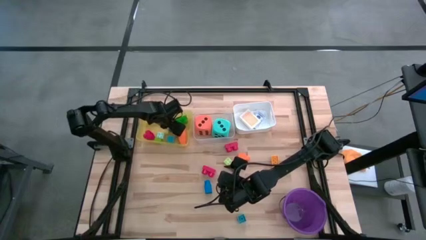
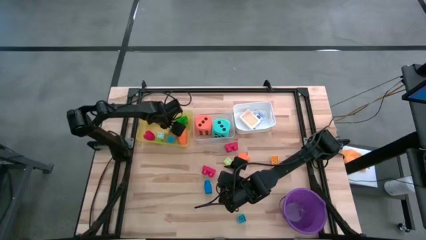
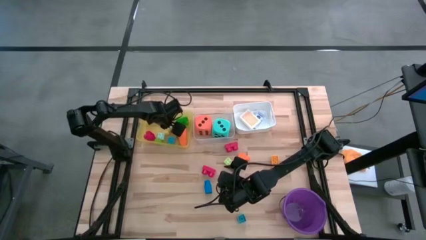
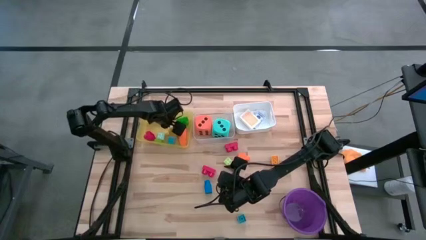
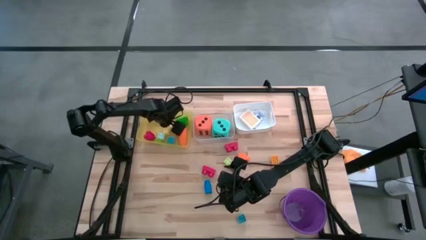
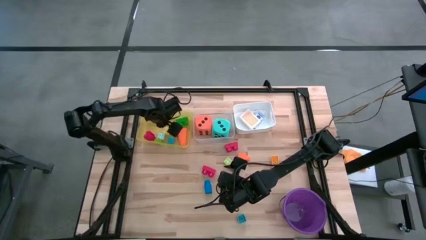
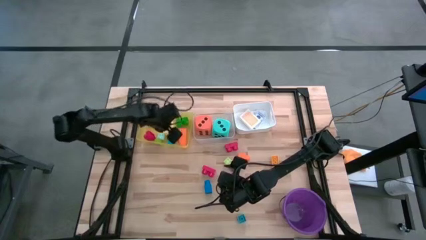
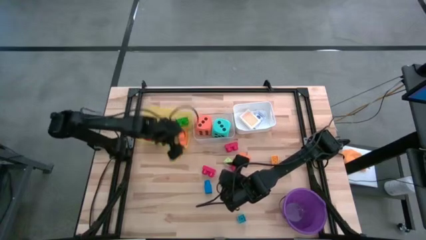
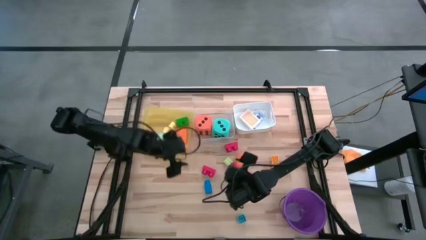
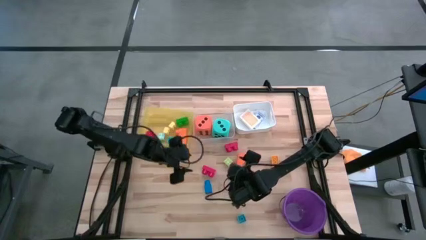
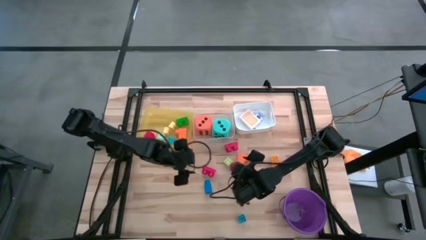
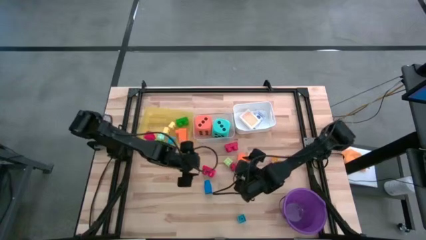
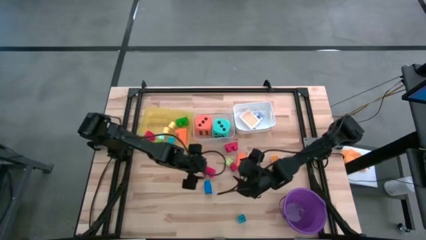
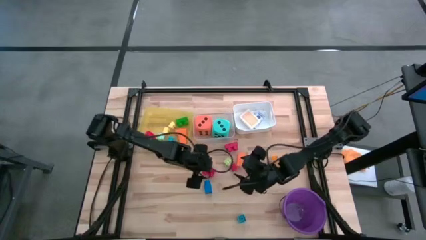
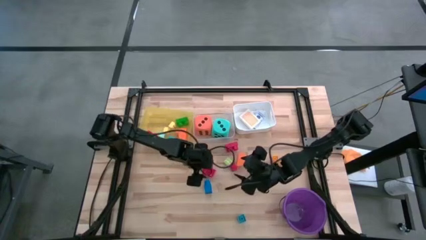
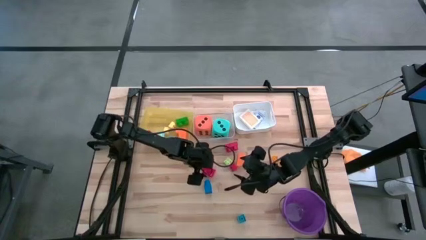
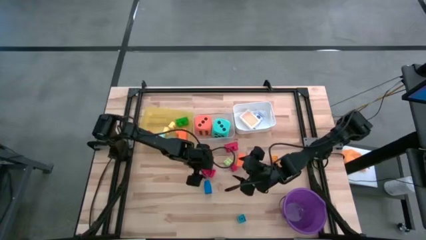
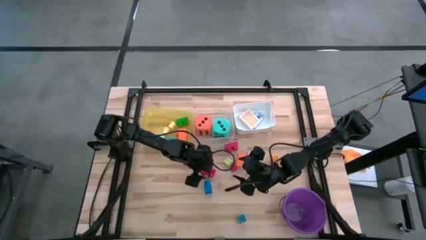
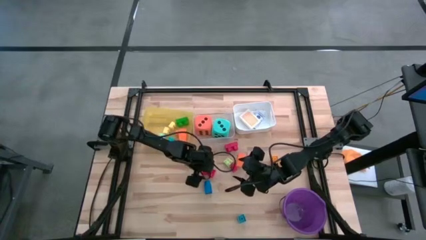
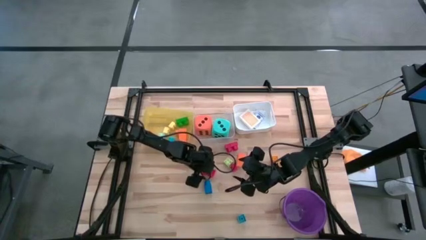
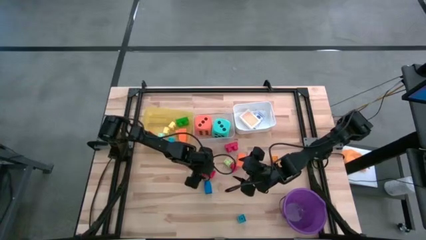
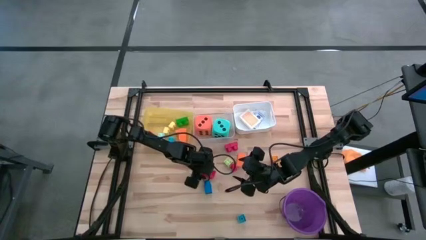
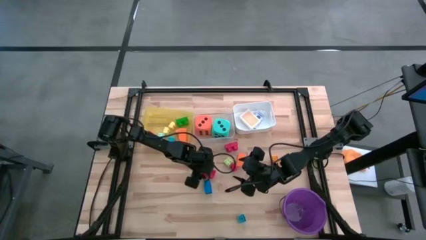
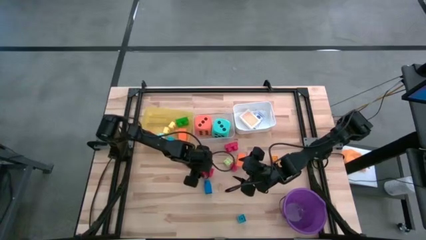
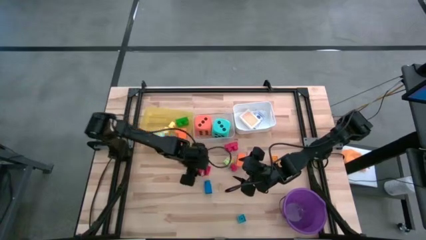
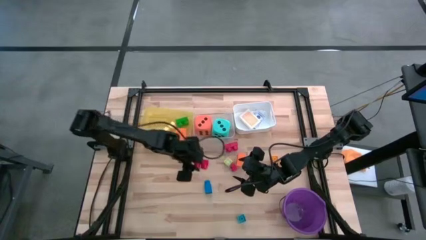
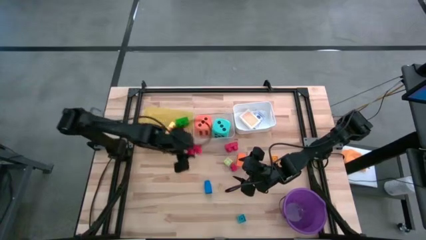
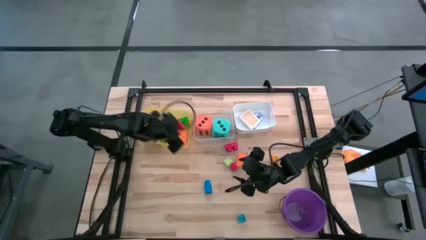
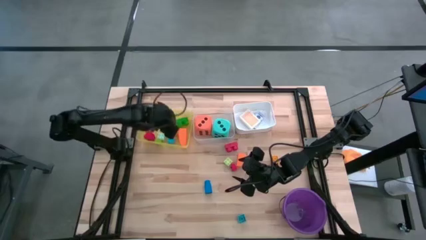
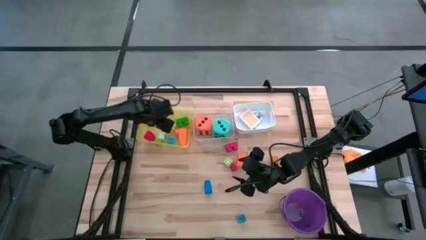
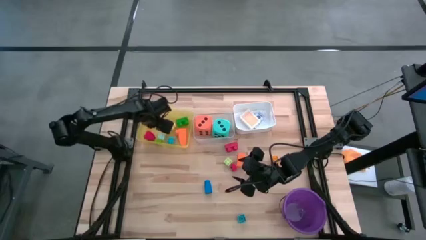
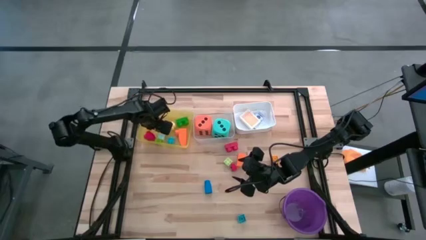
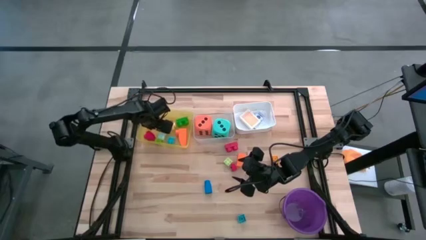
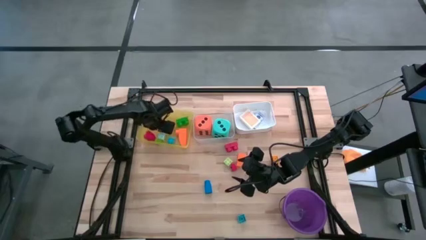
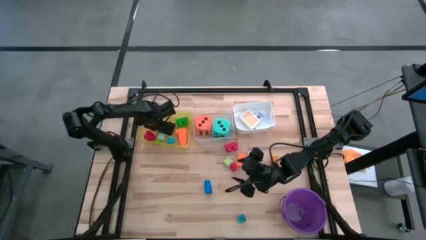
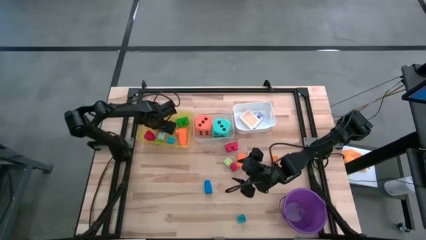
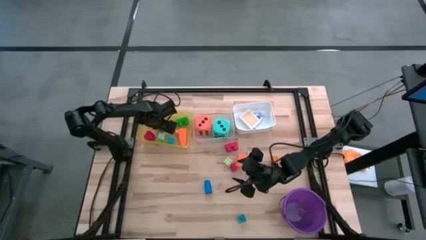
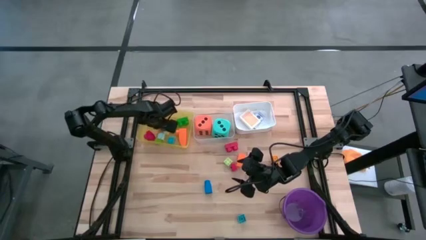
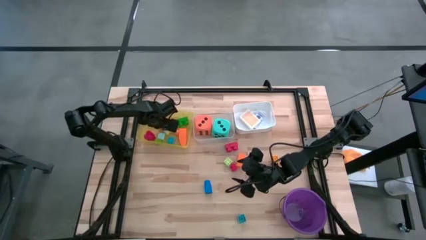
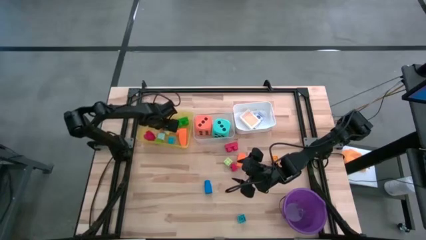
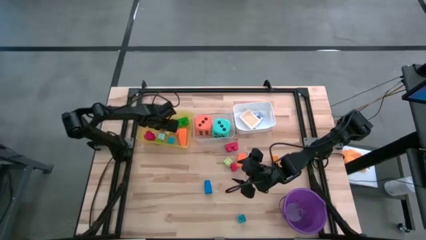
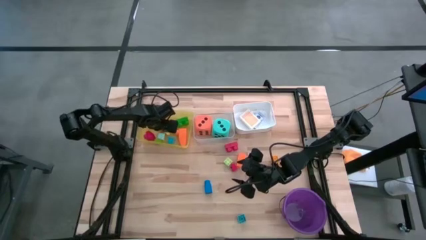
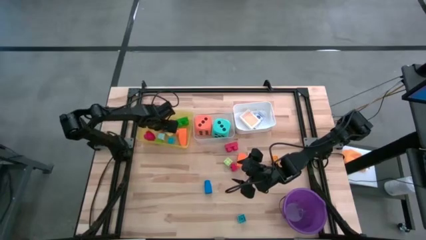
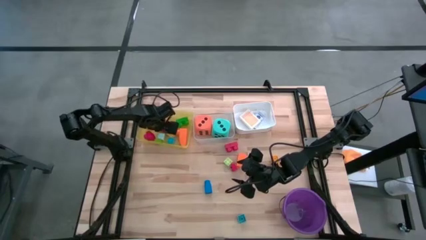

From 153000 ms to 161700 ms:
Task: Pick & Place Toys
Put the red game piece into the yellow bin

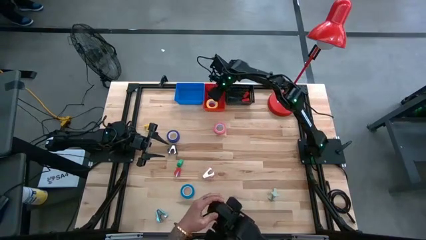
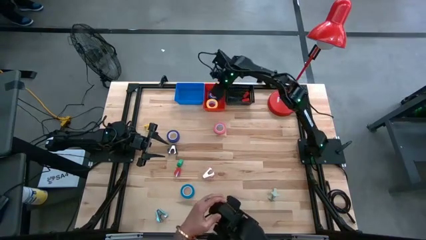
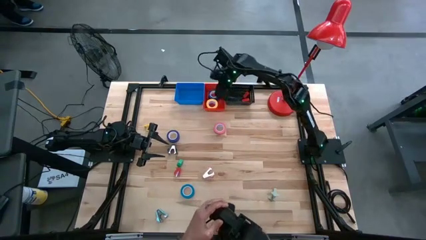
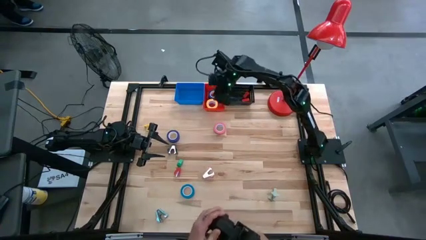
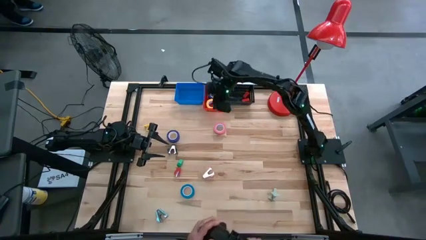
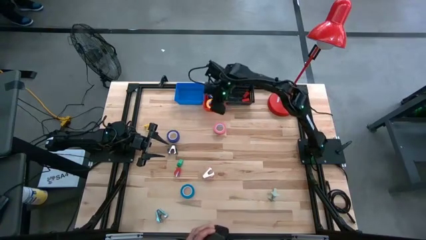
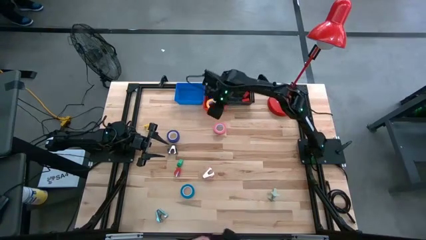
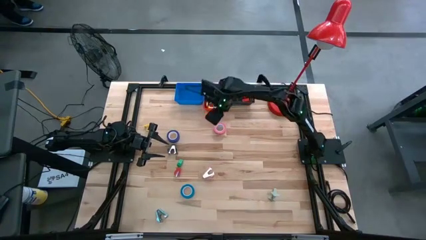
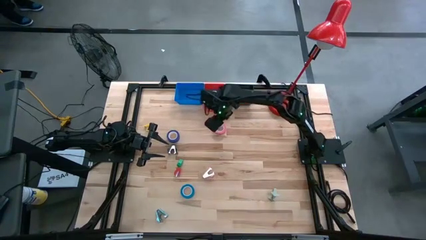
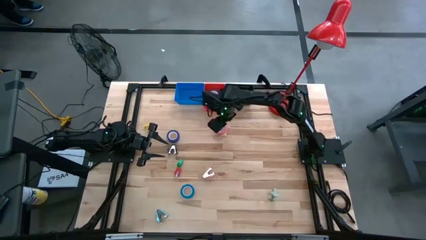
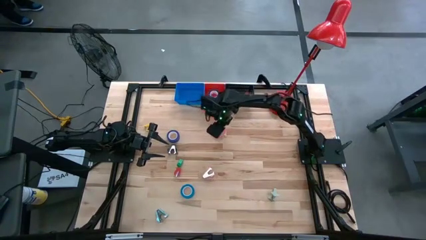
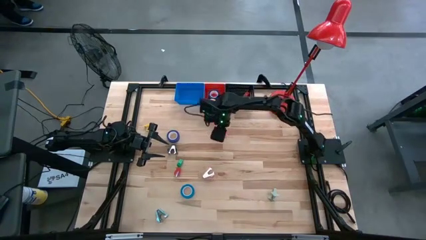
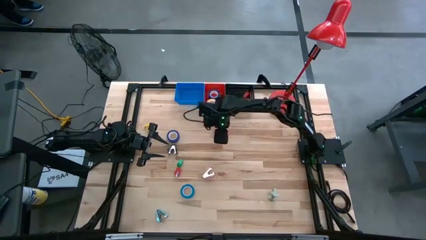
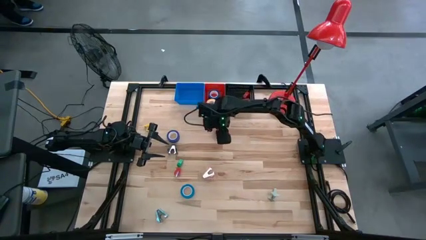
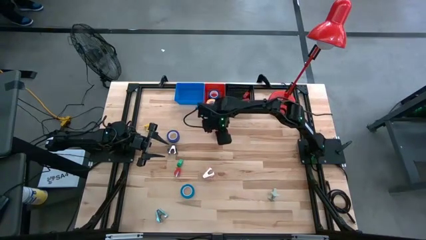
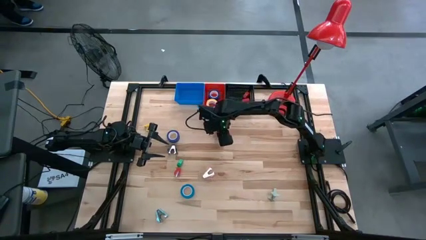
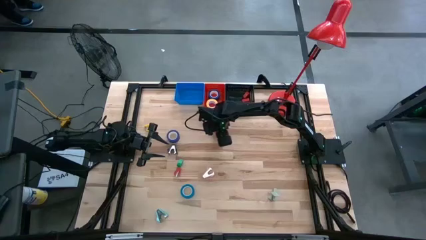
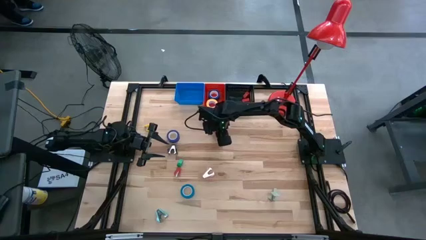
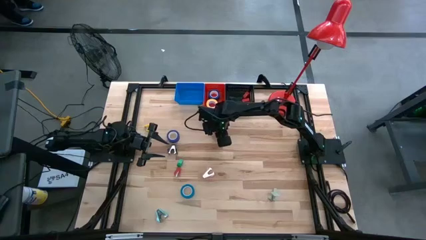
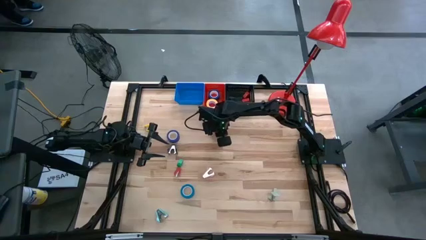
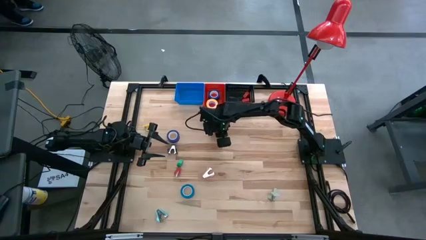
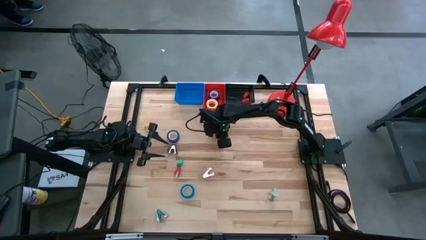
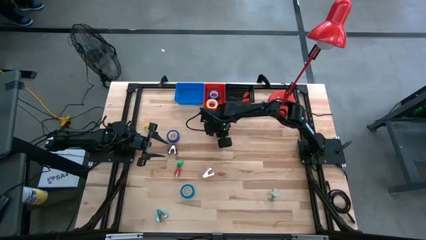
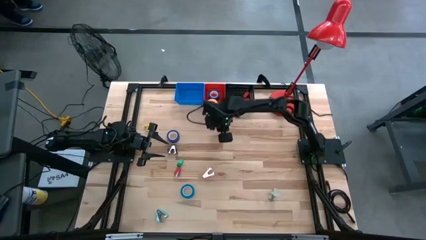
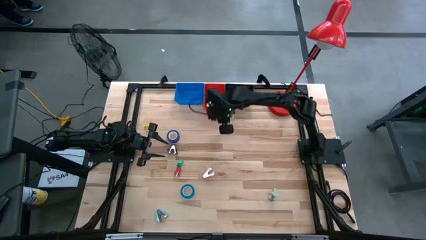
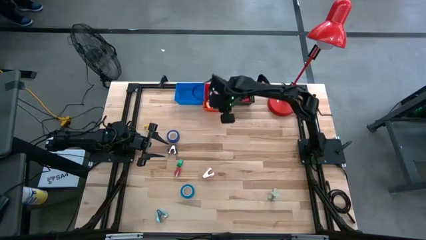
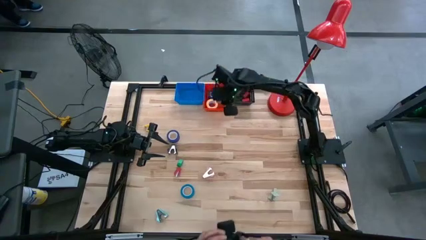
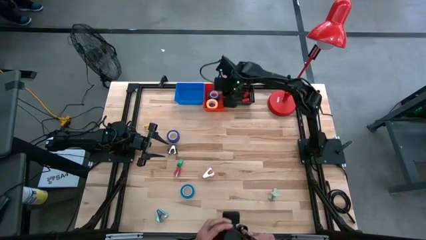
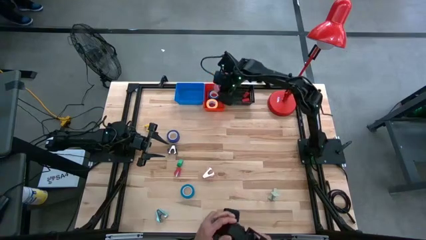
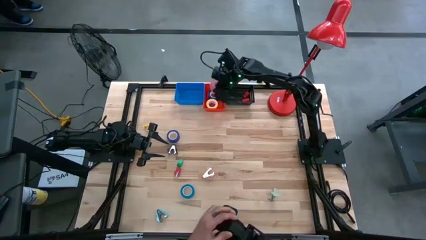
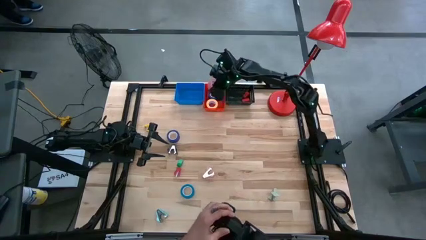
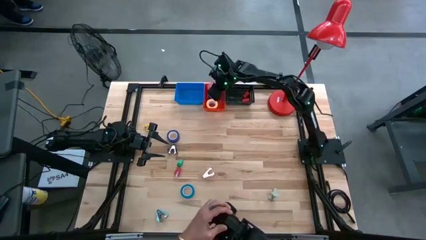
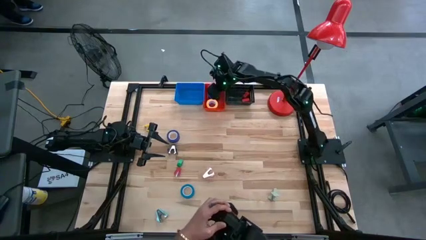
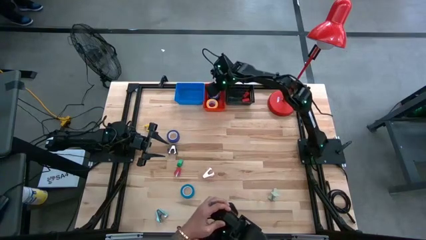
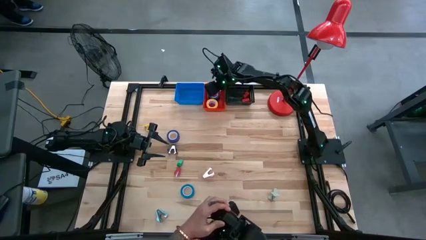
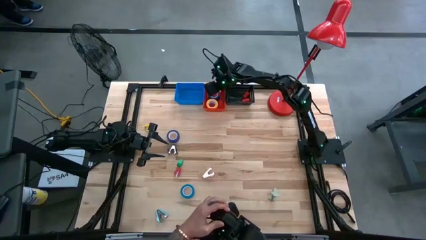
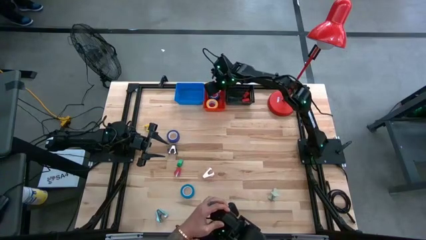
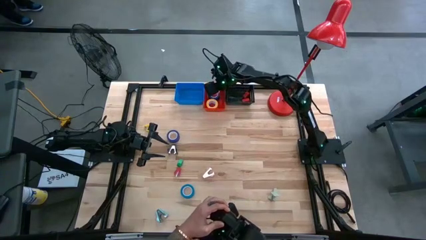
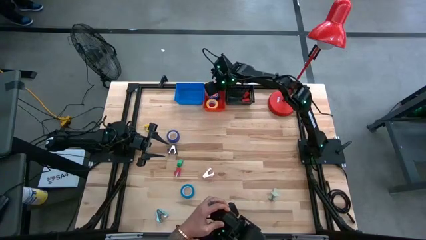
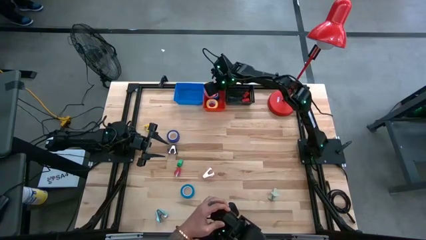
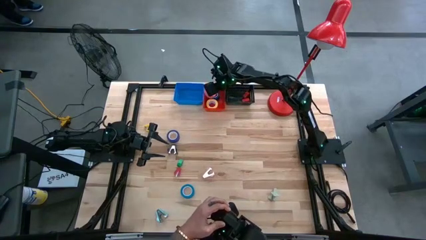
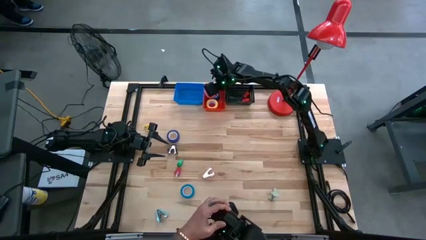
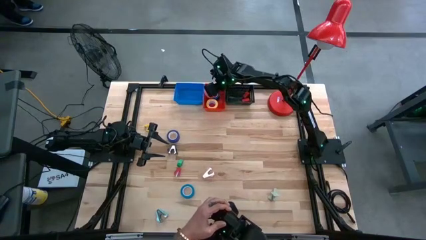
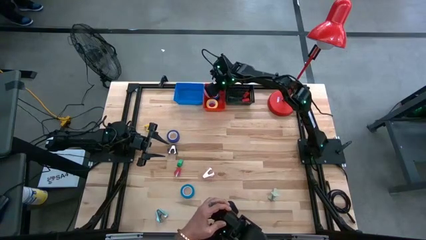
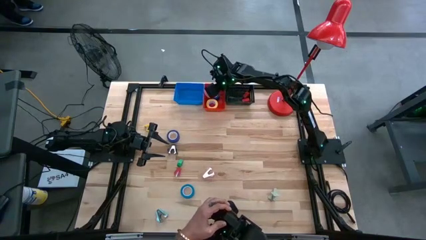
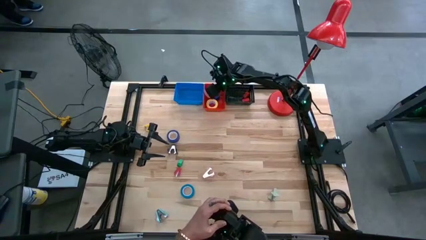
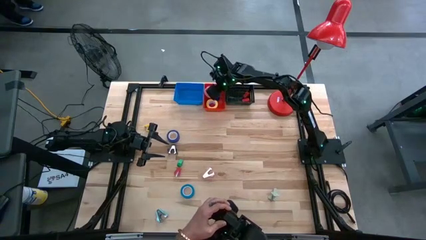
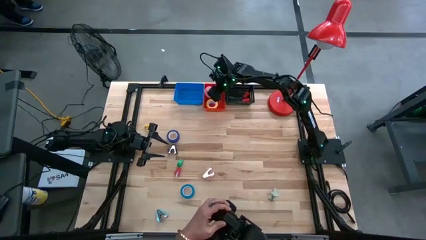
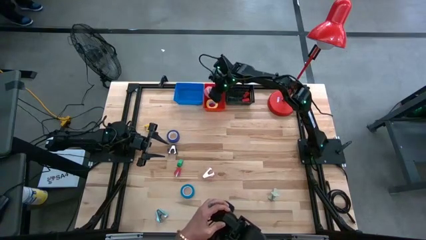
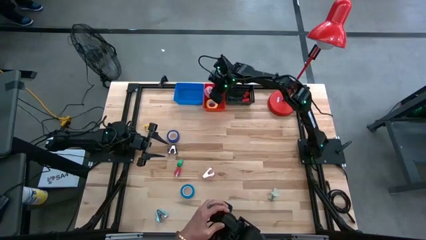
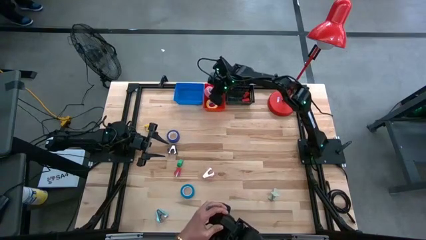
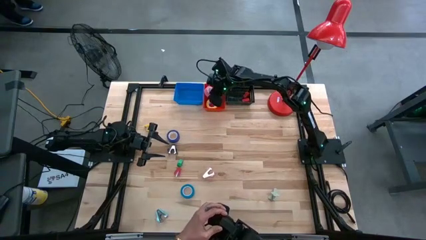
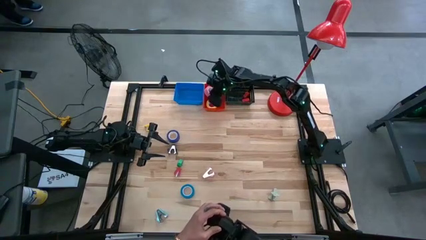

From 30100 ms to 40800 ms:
Task: Pick and place Stapler, Stapler remover, tape
Put the pink tape into the red basket
